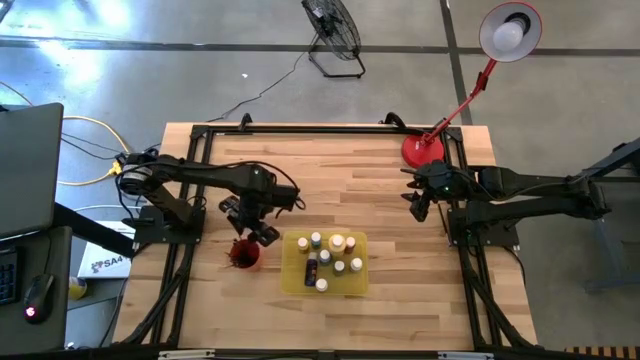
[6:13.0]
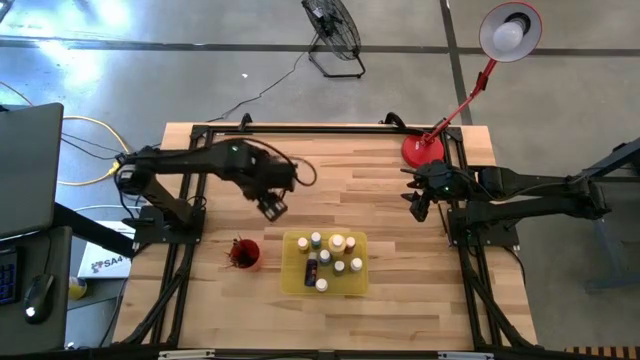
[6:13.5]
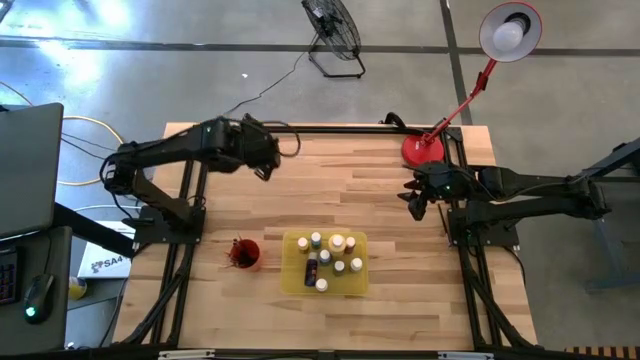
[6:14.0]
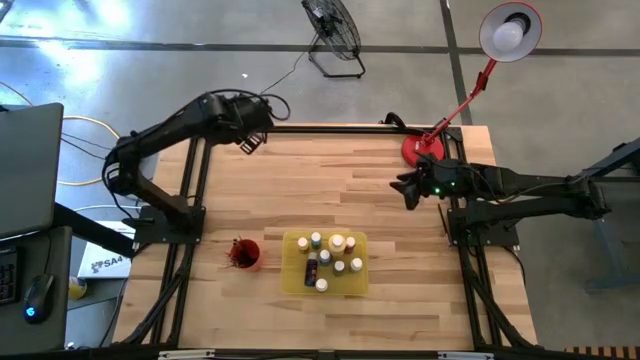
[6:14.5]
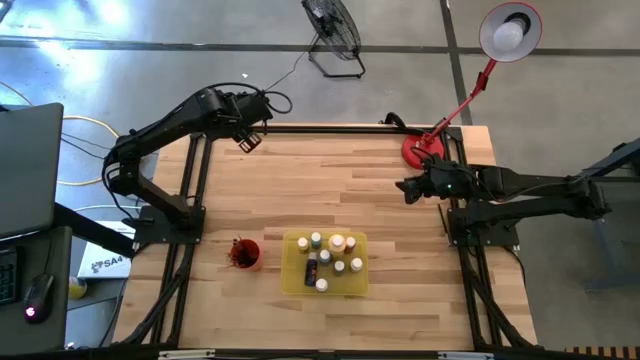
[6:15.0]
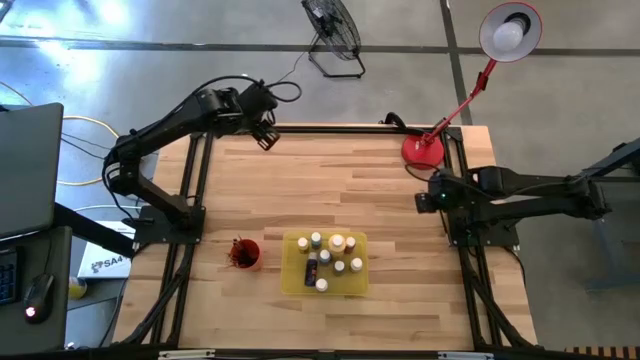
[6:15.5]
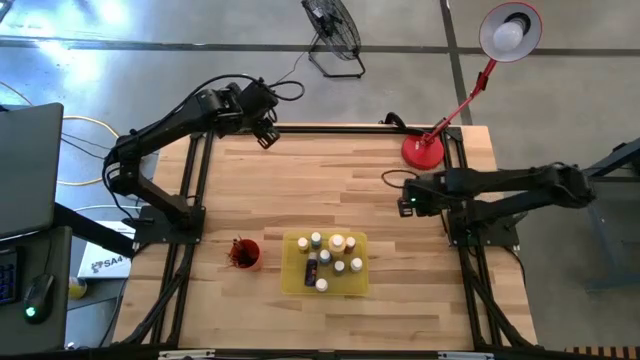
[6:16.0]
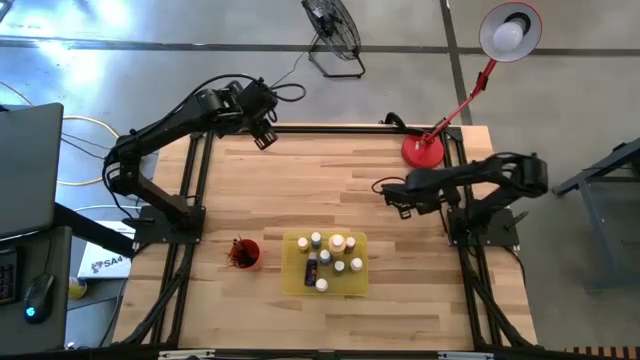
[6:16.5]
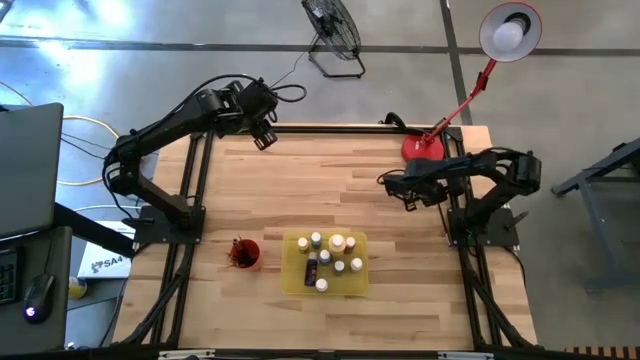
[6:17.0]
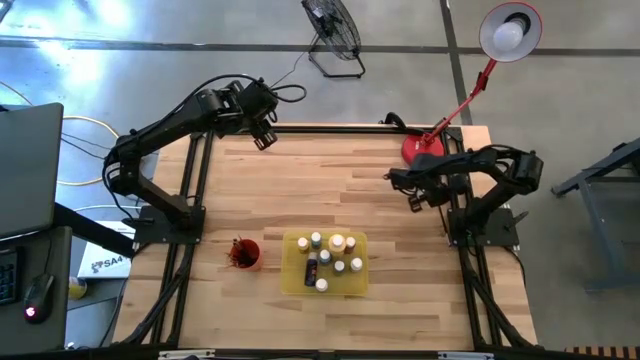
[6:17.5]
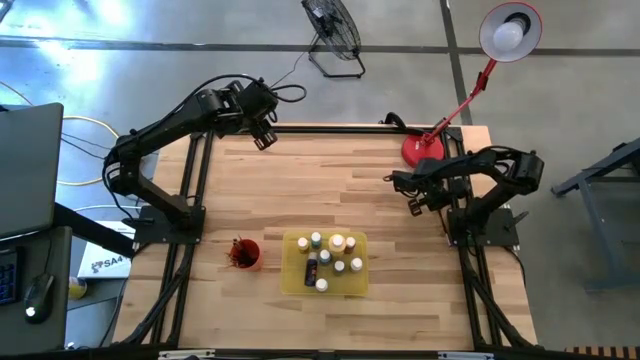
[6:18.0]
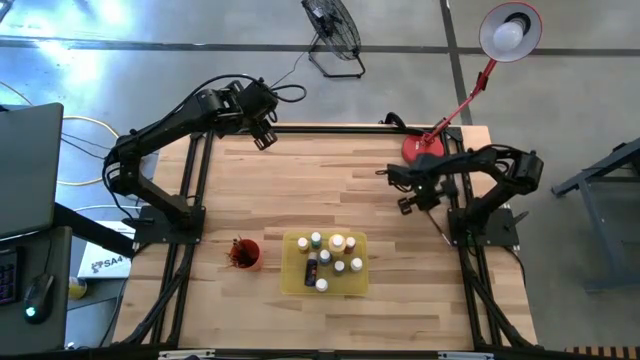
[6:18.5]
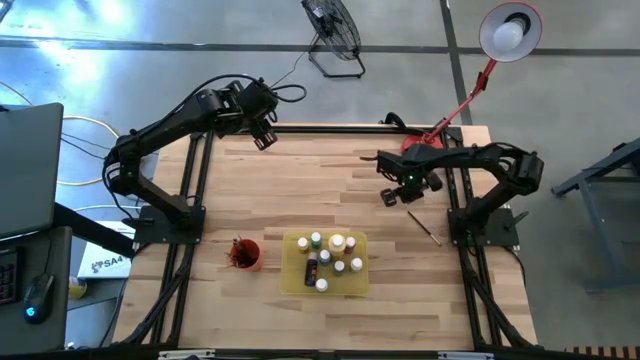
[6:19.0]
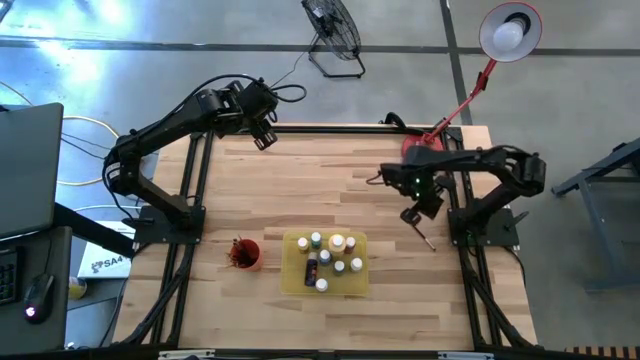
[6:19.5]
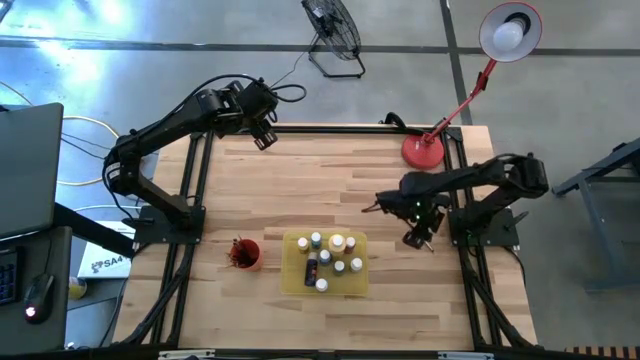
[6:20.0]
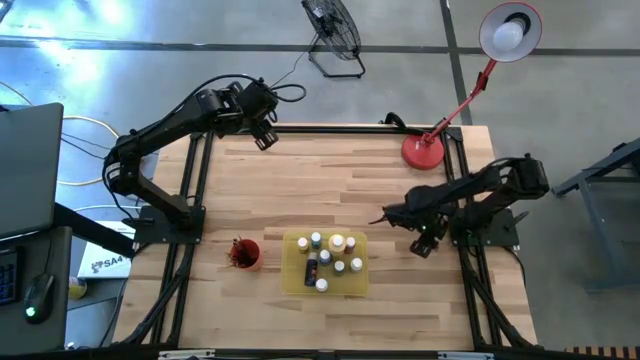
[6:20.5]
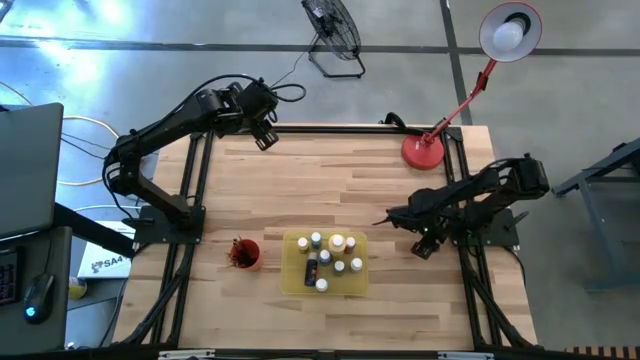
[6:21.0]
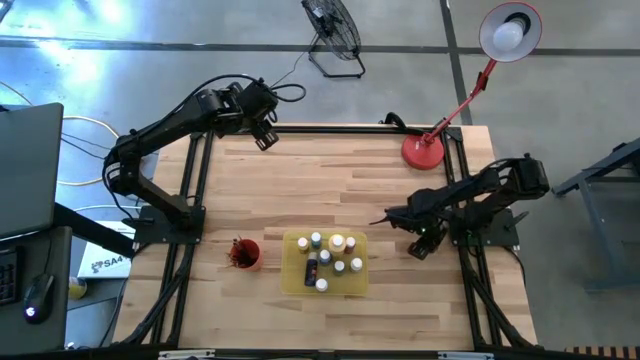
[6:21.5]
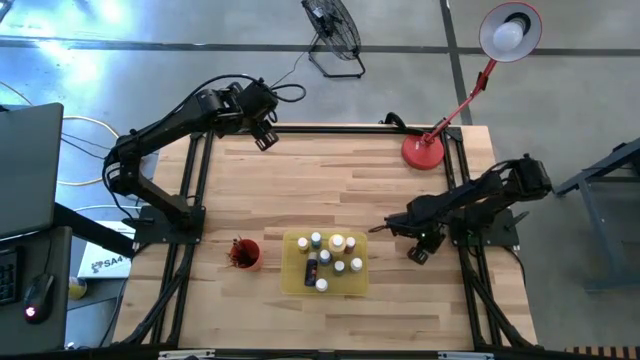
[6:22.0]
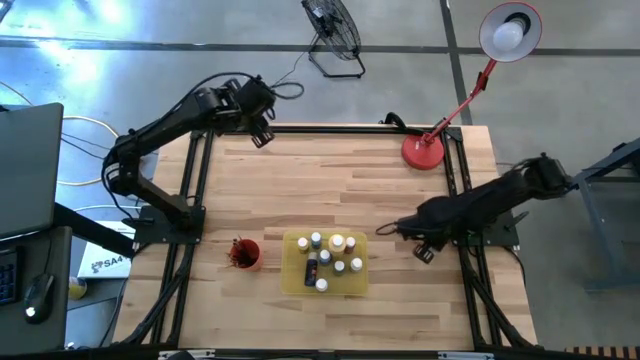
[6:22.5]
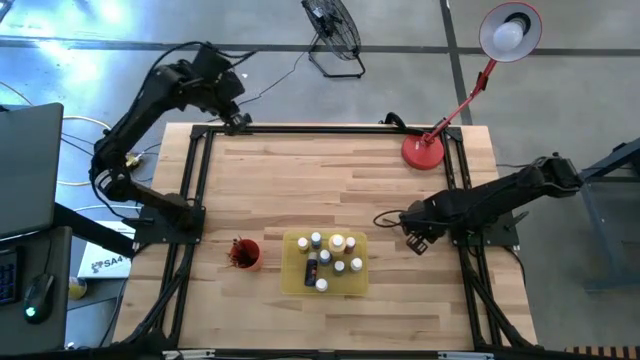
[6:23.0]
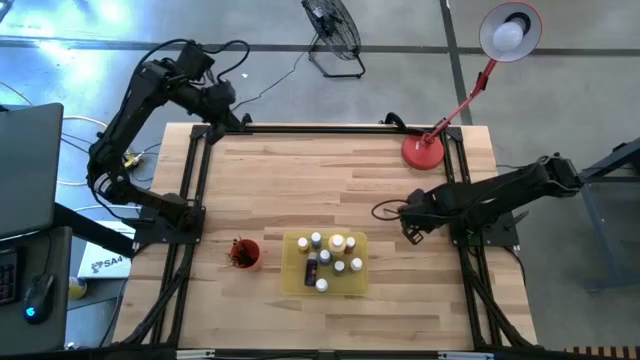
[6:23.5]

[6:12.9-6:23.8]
Task: Pick & Place Paint Supplies
Put the silver paintbrush into the orange cup

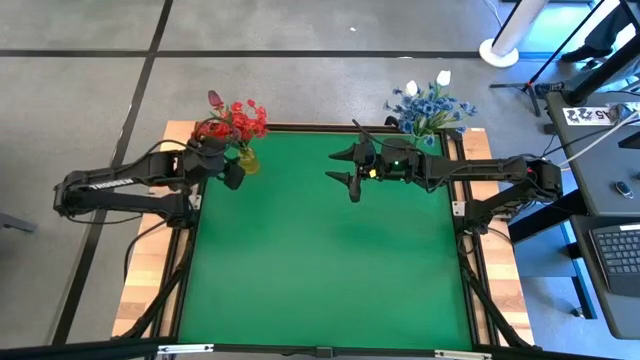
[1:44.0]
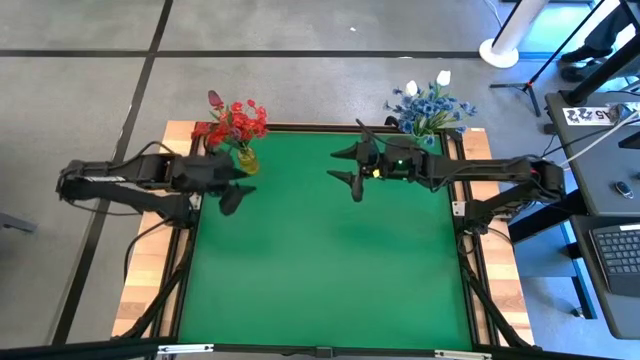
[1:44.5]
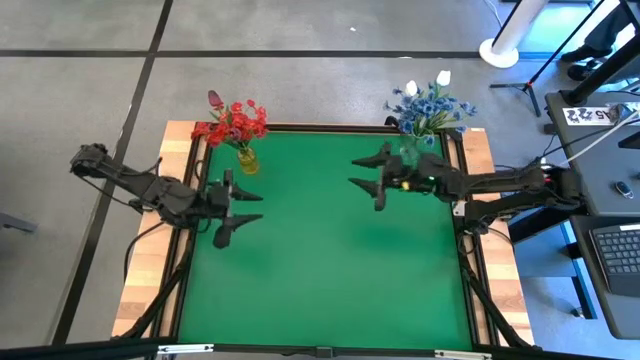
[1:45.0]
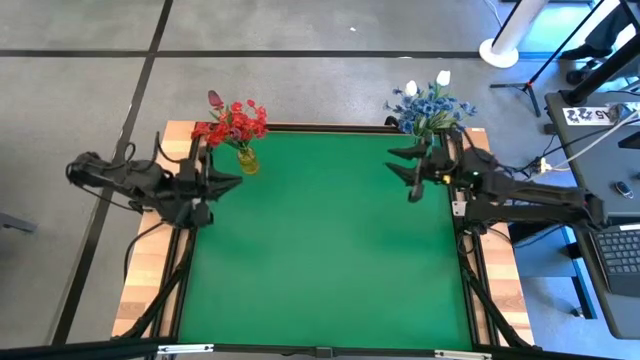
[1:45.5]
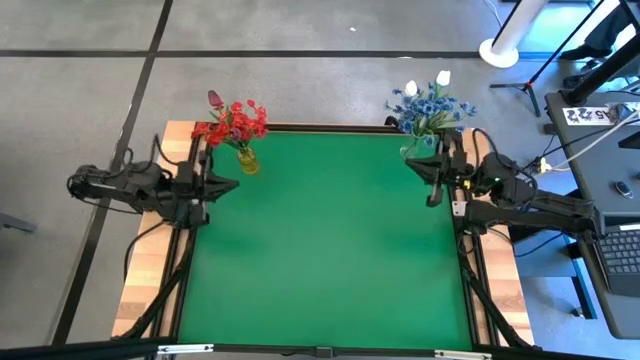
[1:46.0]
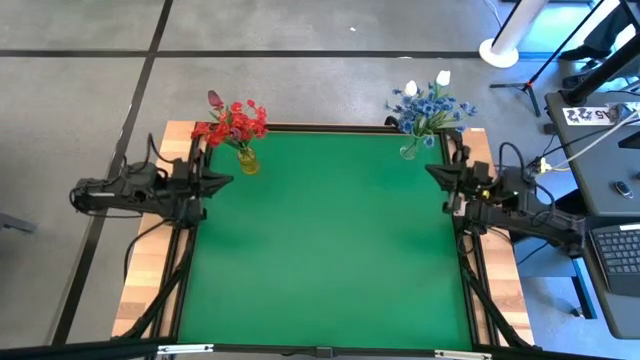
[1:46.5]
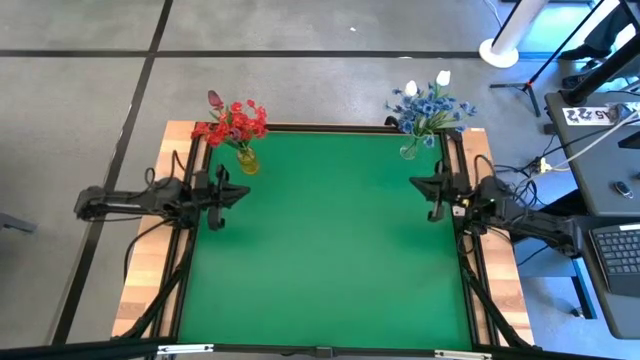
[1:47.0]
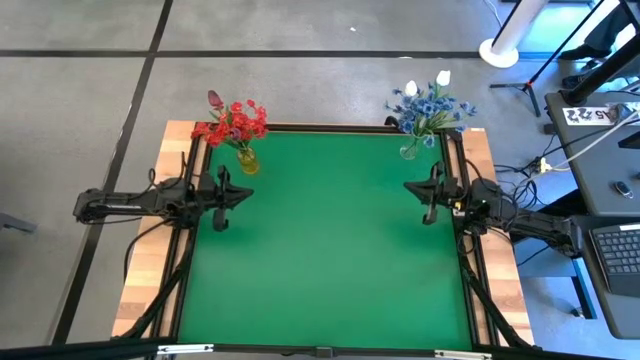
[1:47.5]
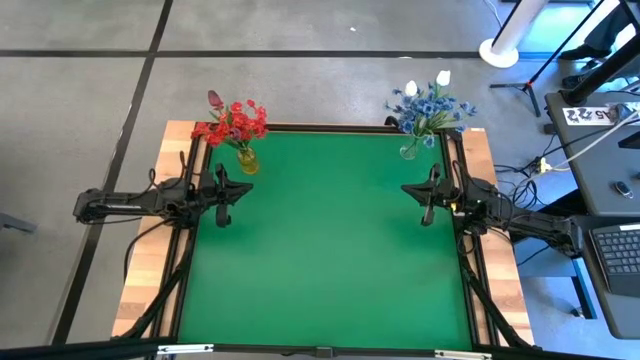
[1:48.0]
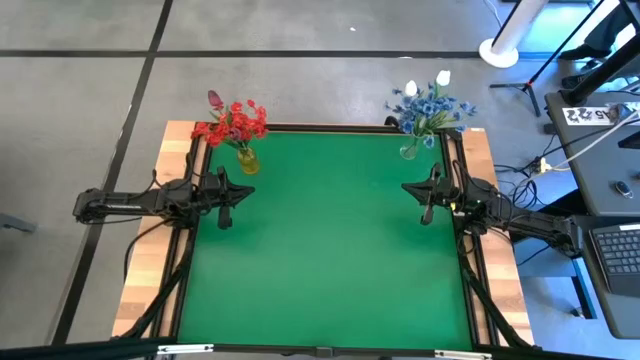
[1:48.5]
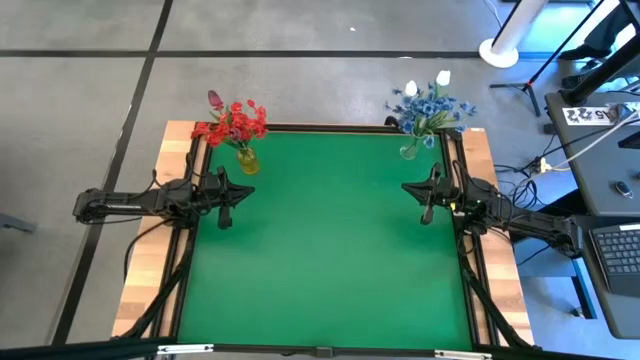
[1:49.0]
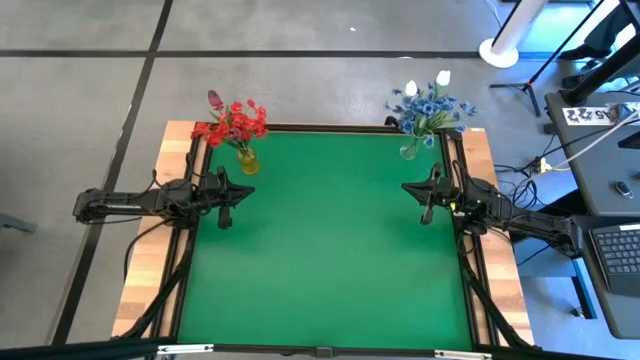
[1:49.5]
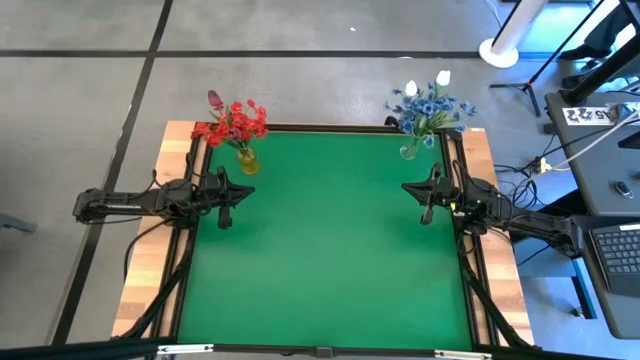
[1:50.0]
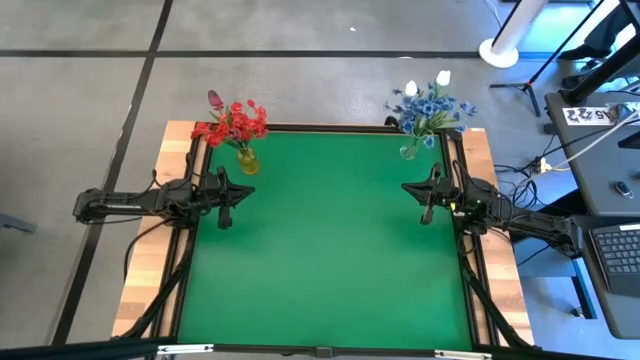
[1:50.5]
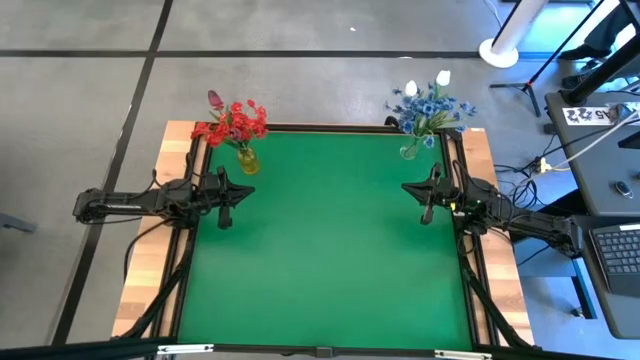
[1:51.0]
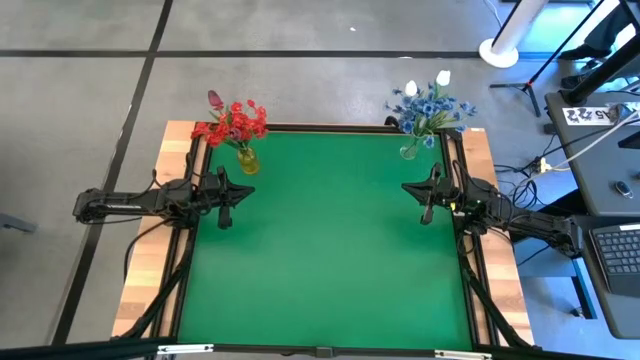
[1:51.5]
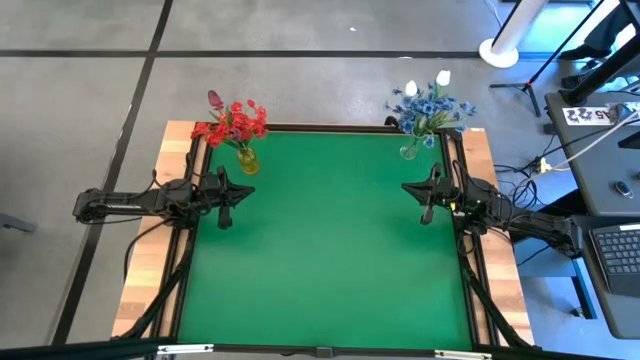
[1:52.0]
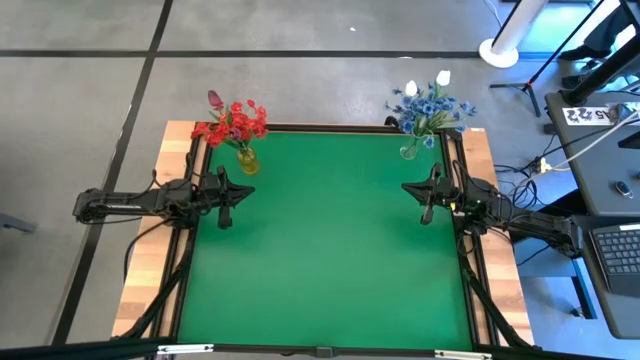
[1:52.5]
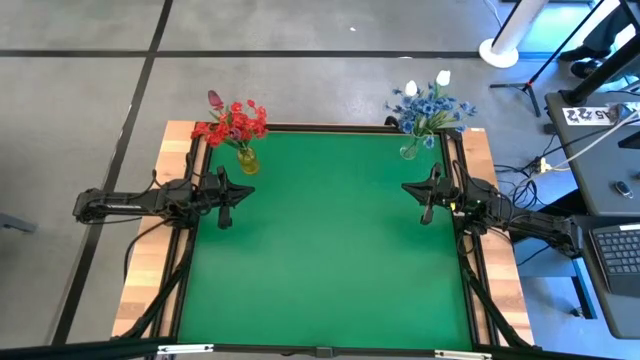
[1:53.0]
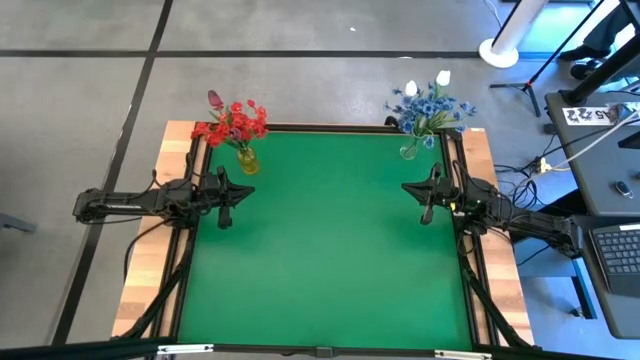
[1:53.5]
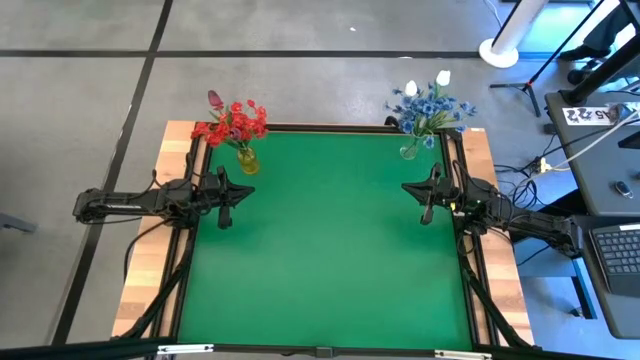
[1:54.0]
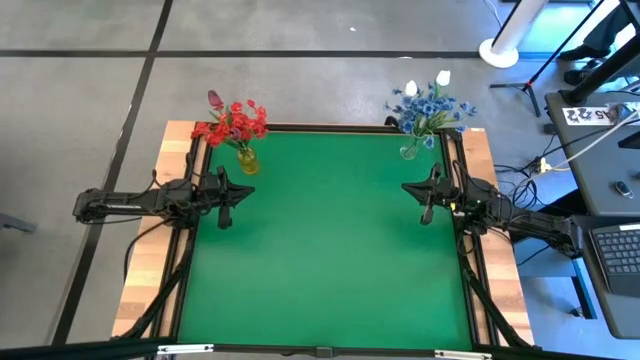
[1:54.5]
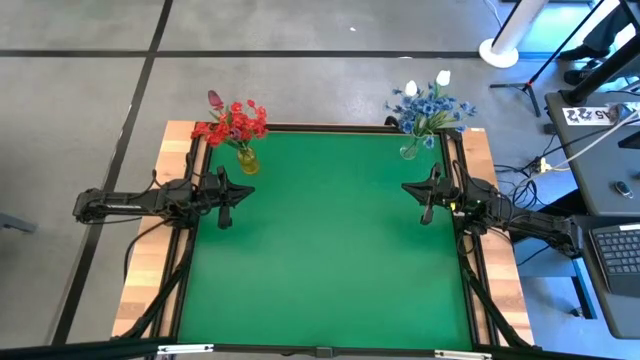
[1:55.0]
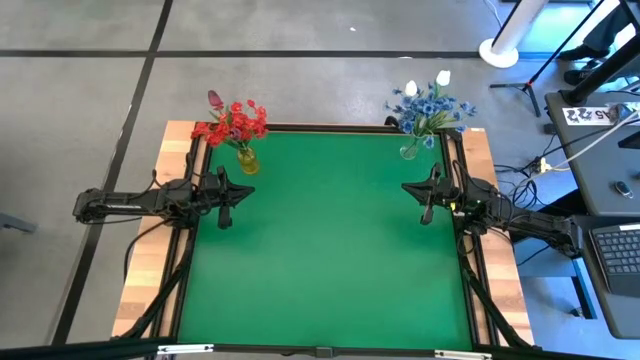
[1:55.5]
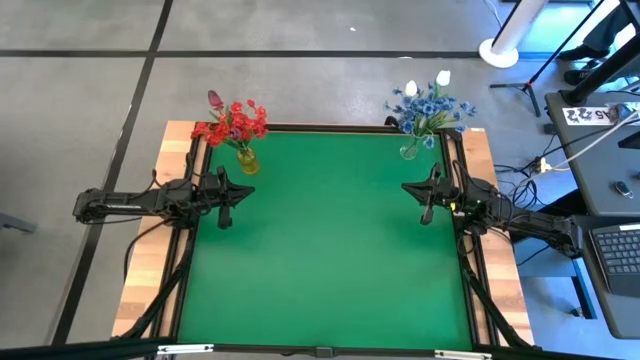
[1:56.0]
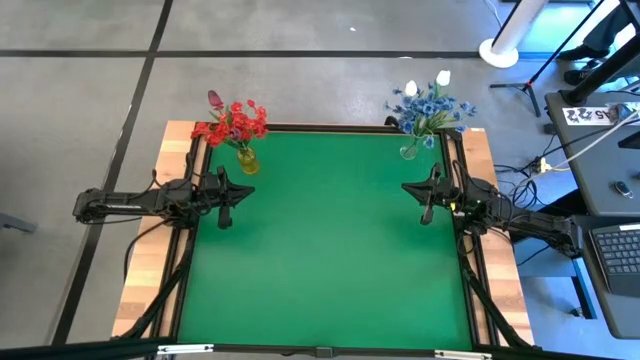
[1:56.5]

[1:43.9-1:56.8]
Task: Sort flowers into vase by color
Return to Home Position
